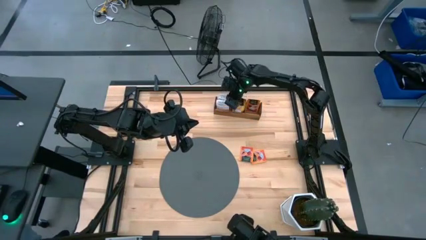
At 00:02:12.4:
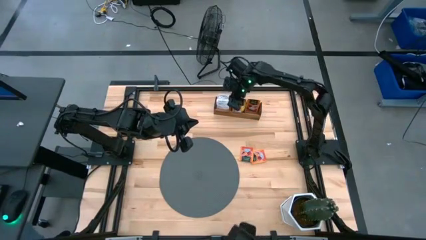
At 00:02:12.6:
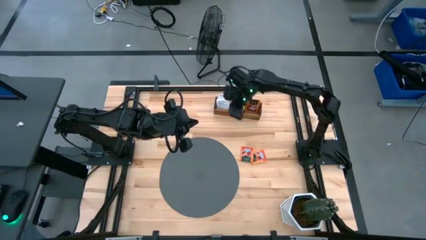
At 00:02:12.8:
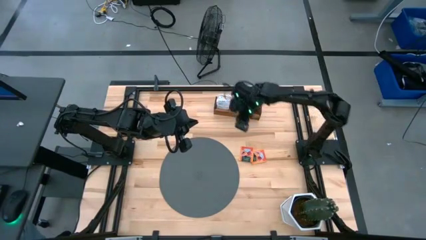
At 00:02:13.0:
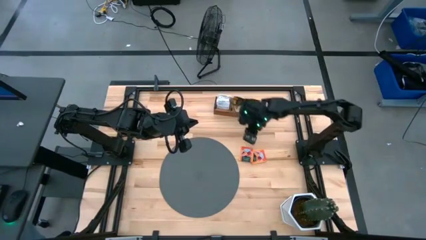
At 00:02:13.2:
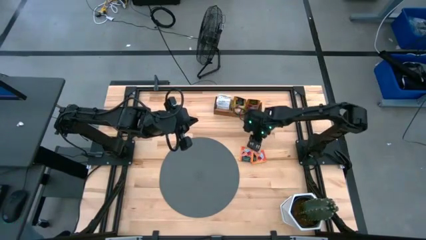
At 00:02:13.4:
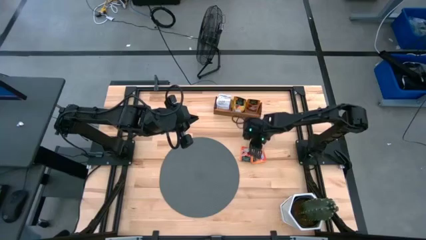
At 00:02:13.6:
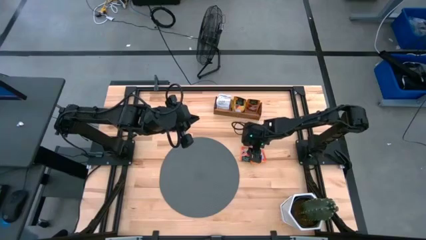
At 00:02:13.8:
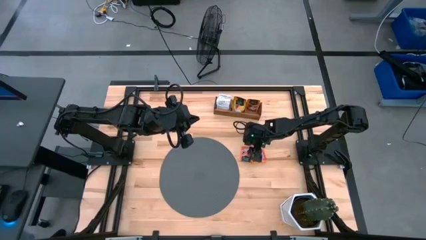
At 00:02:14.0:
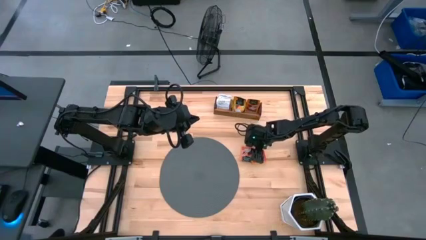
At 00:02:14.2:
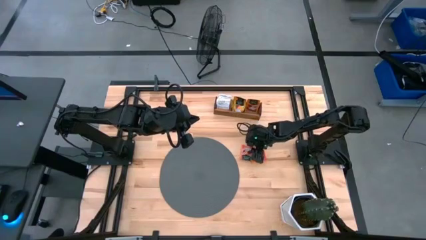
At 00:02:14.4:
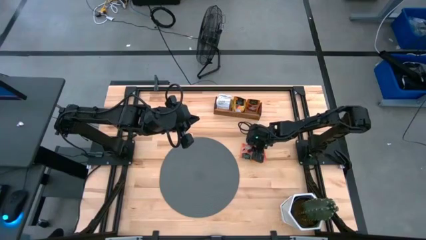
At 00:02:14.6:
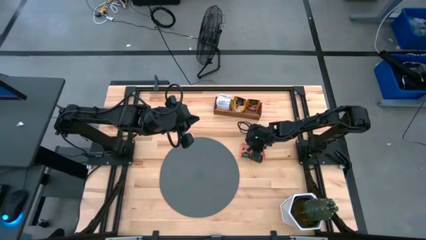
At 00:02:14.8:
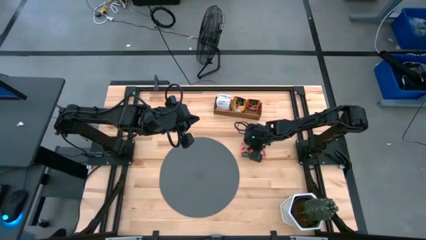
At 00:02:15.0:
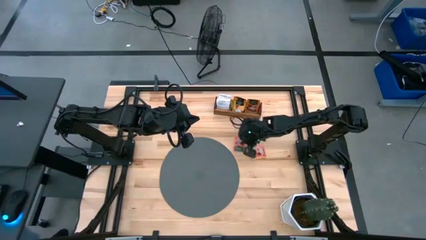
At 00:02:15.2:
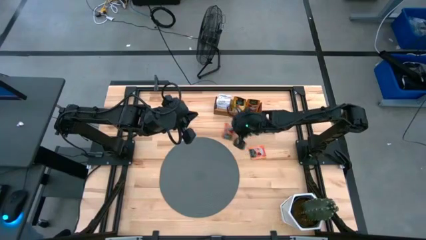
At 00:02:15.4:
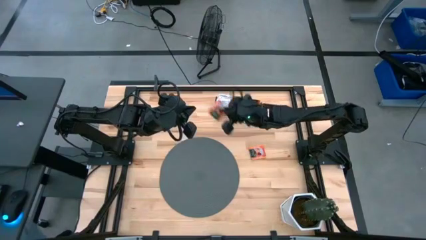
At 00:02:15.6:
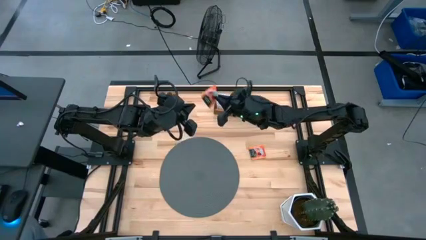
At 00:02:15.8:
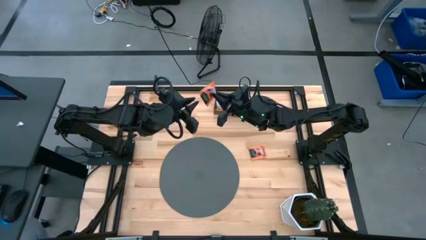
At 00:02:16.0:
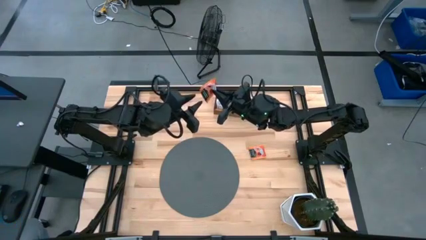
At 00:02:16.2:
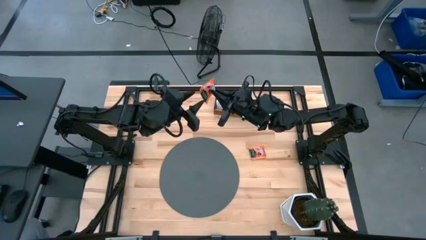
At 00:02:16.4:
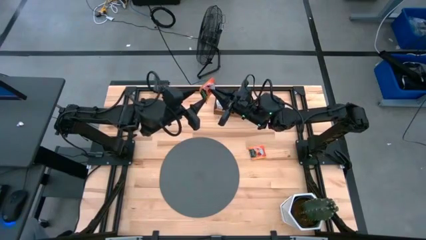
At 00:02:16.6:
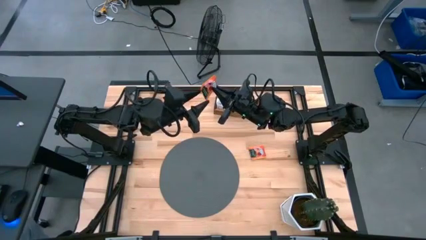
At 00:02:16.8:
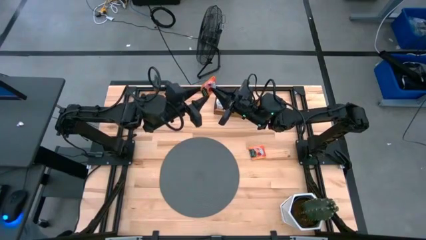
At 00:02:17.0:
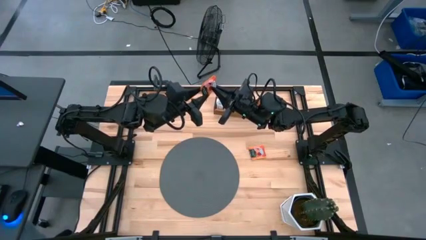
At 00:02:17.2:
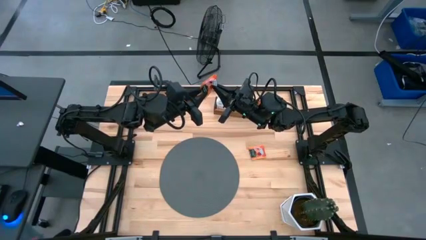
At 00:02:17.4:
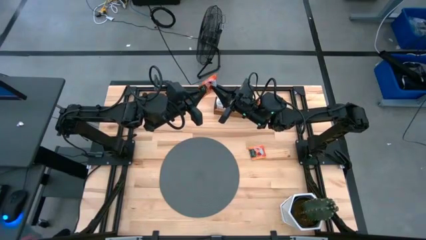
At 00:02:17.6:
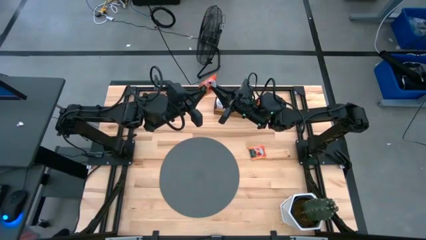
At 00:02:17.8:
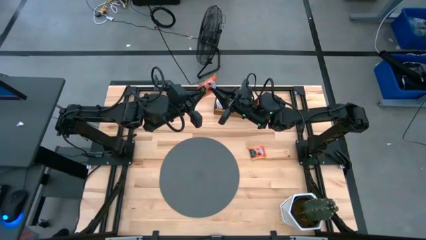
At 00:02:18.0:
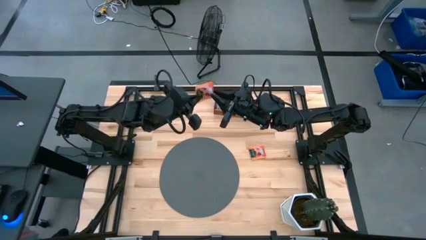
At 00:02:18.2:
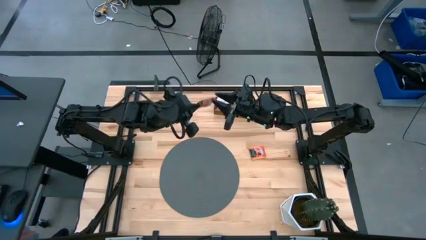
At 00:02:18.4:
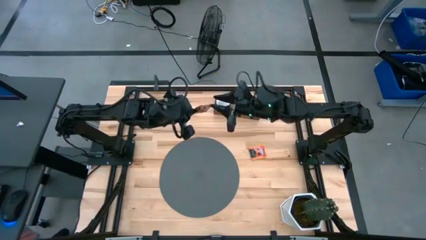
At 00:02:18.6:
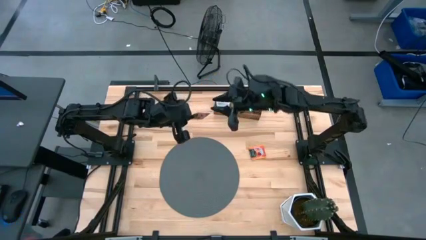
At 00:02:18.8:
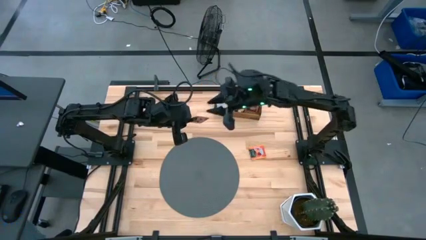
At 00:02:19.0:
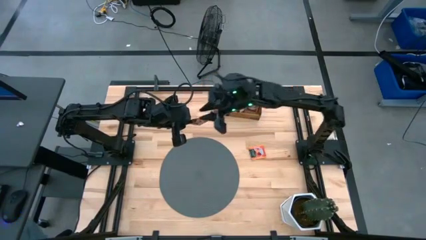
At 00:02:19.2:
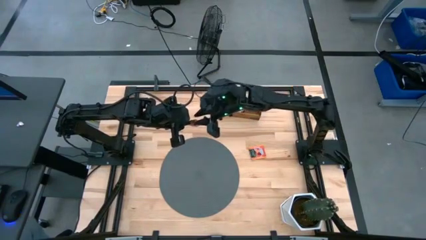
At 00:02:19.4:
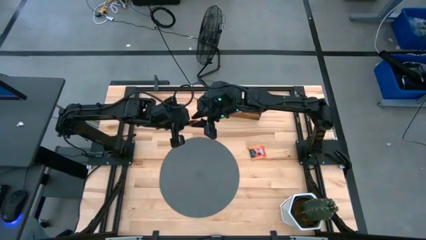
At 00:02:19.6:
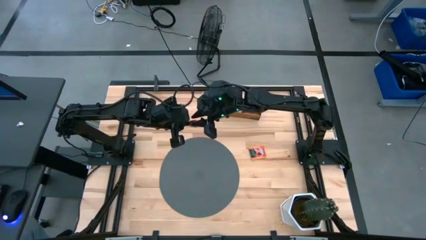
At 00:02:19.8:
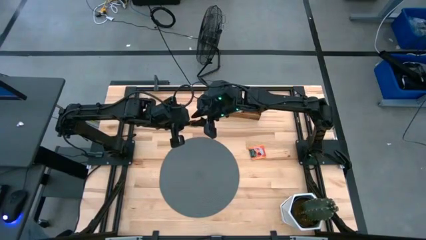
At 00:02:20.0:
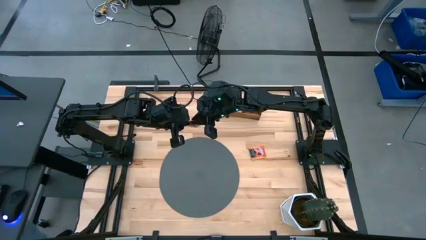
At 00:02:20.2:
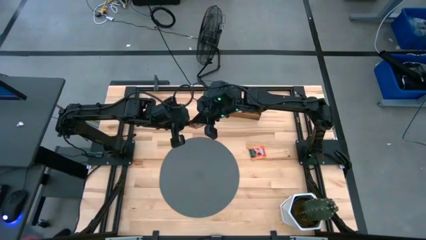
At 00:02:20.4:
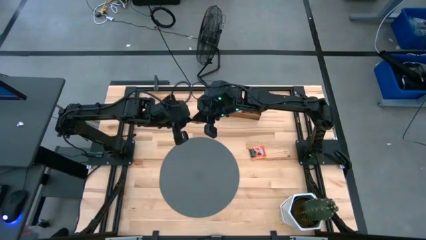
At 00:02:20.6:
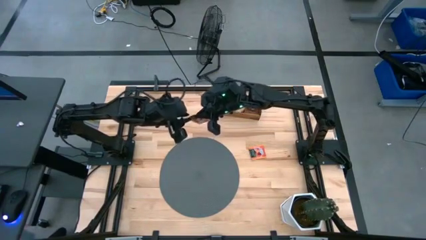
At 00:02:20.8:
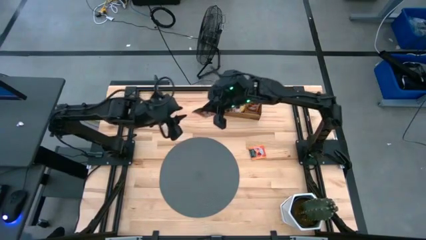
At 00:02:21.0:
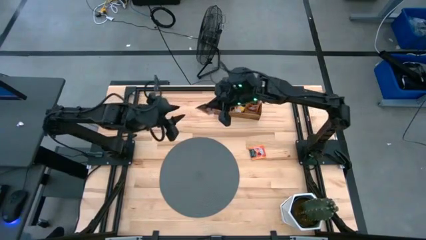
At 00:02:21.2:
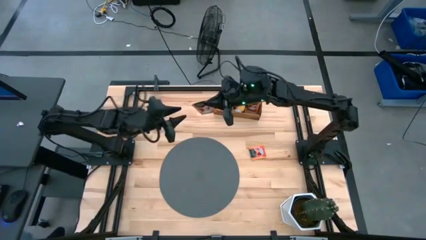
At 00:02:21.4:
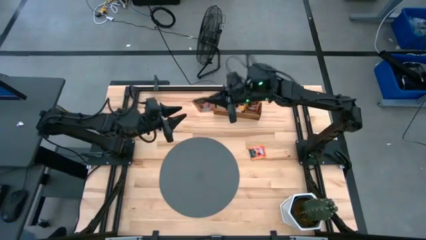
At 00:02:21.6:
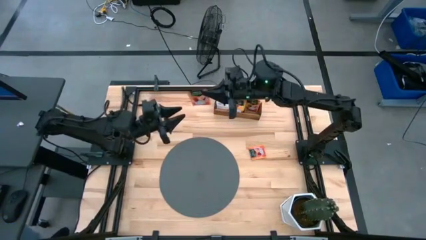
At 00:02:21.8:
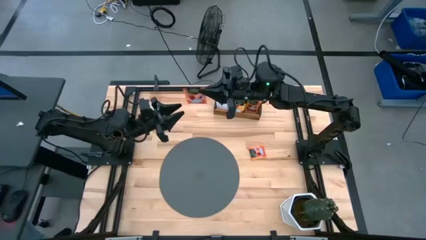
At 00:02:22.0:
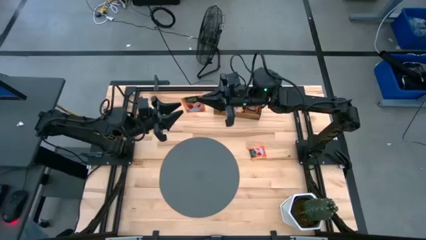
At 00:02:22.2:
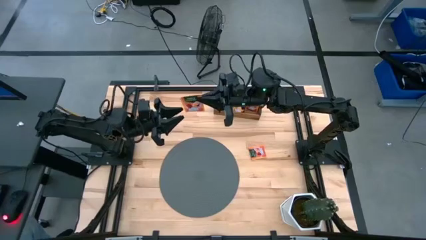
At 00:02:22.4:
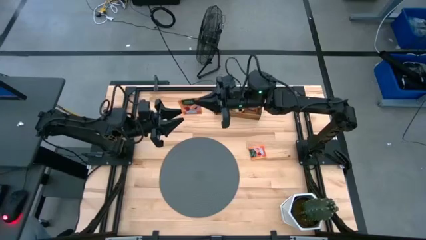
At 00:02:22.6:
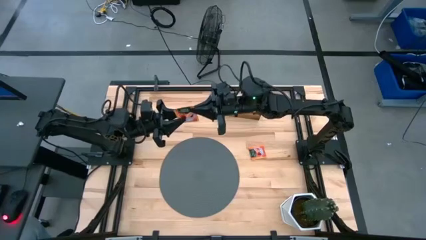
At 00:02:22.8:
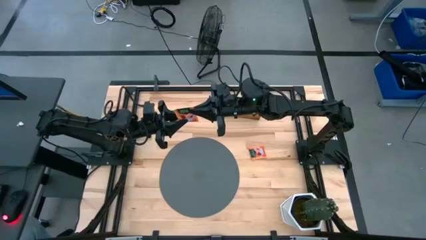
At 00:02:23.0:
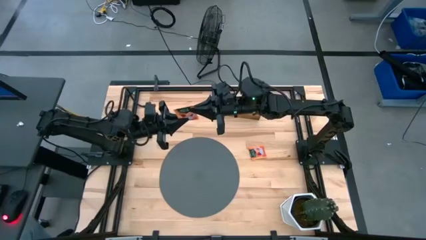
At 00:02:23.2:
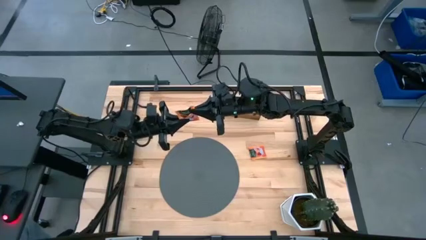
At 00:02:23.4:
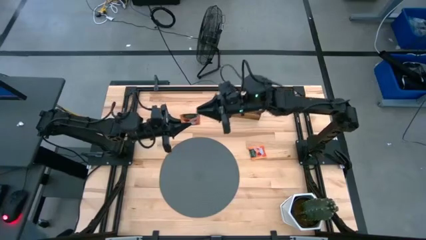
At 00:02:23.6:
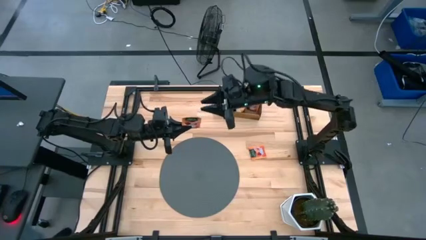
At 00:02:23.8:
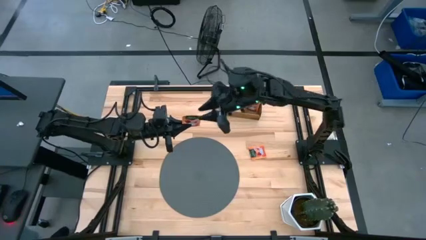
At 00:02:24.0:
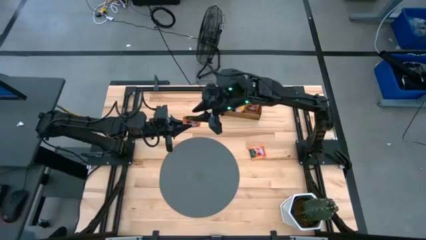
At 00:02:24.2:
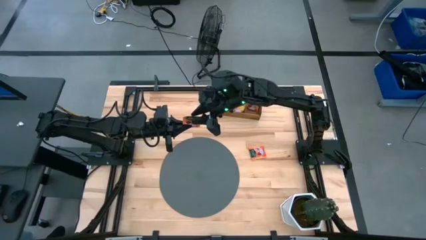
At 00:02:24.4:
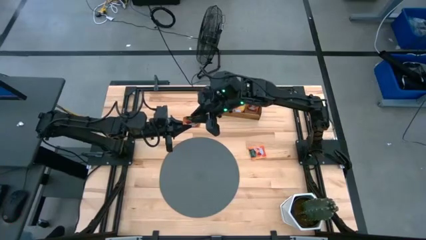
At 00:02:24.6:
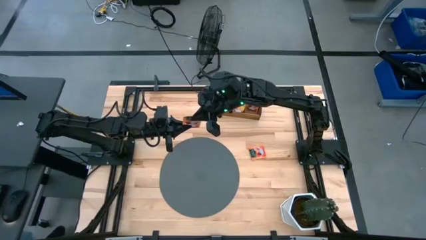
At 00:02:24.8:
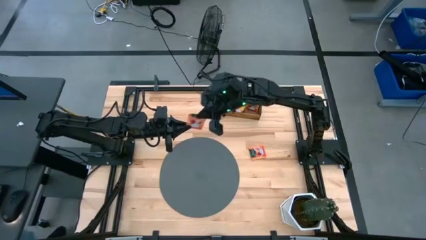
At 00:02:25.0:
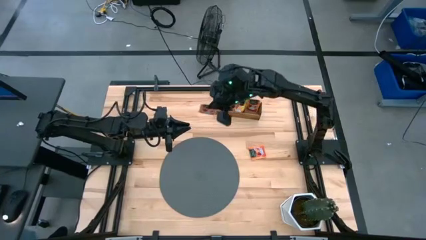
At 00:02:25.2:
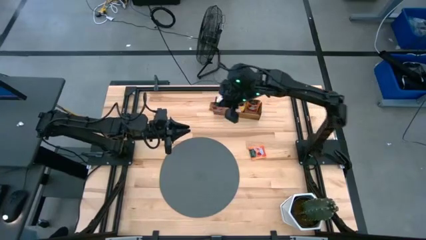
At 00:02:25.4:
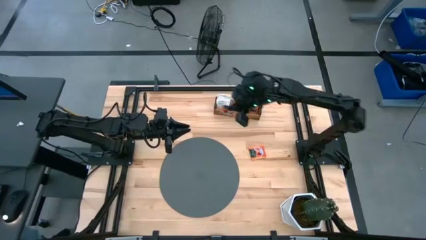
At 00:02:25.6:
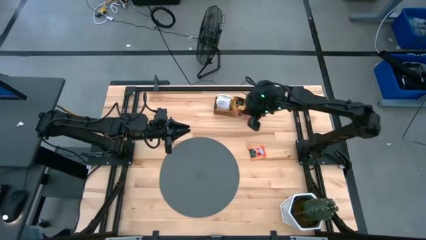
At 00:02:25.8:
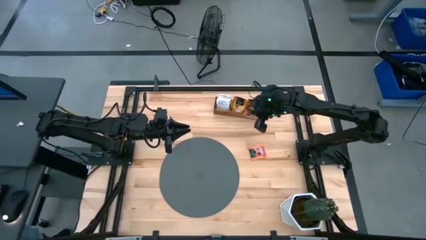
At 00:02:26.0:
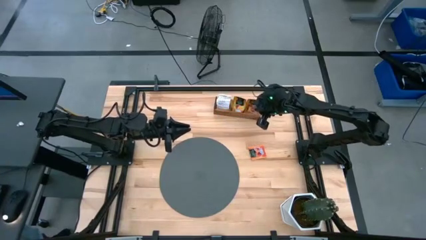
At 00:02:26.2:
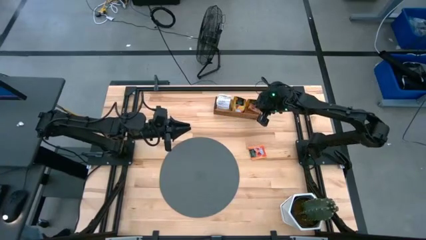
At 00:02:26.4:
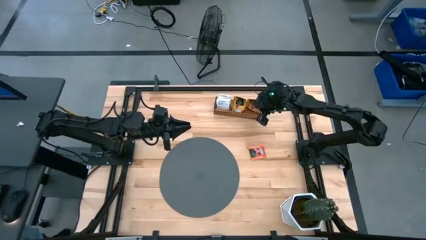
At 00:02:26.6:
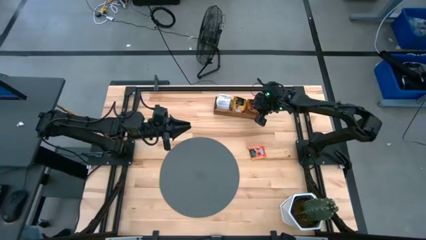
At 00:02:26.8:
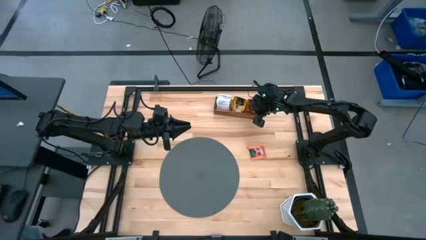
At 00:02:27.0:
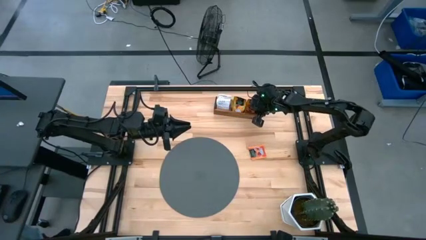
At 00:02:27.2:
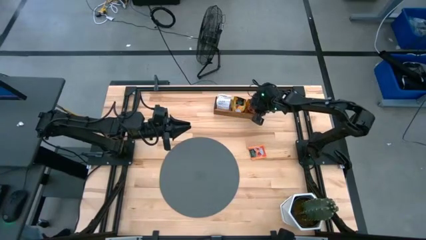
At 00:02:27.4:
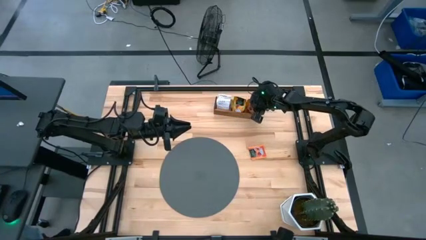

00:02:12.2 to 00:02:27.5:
Task: Pick & Place Tea
Put the orange tea bag into the right section of the wooden organizer
